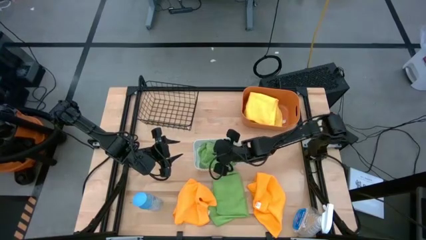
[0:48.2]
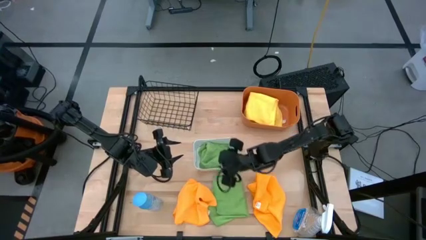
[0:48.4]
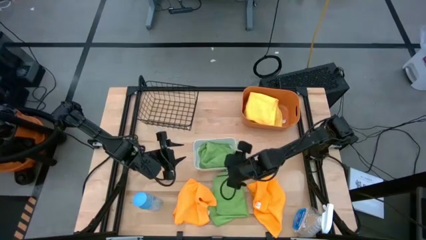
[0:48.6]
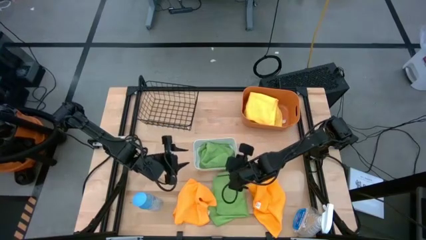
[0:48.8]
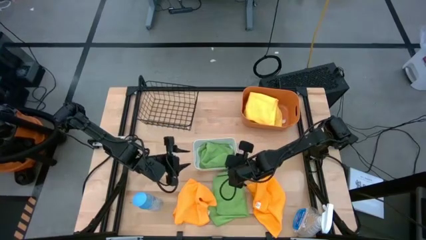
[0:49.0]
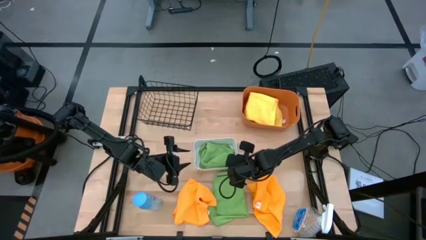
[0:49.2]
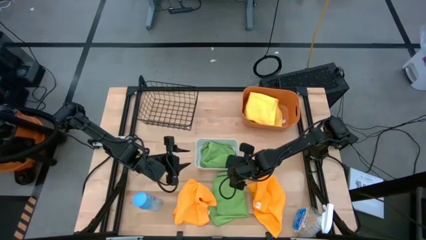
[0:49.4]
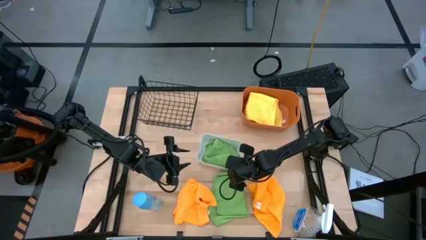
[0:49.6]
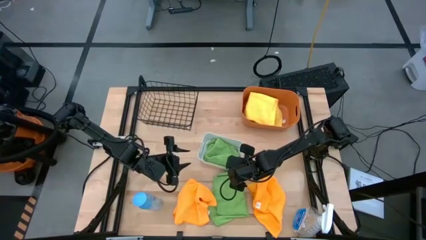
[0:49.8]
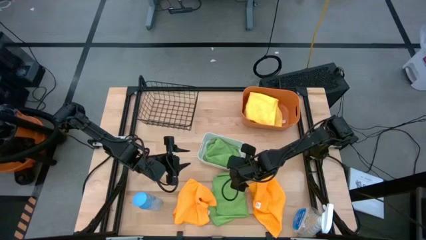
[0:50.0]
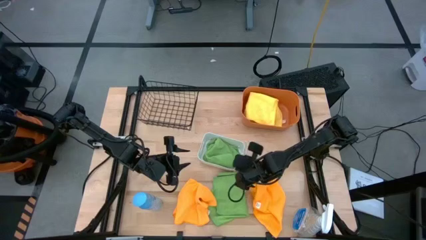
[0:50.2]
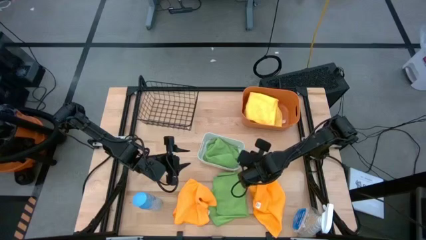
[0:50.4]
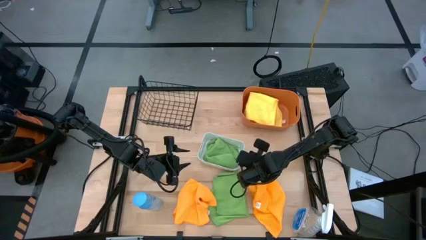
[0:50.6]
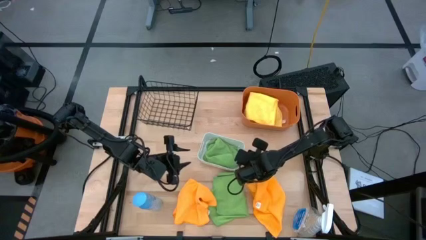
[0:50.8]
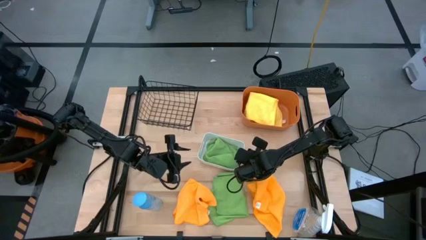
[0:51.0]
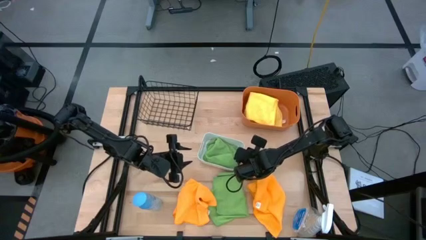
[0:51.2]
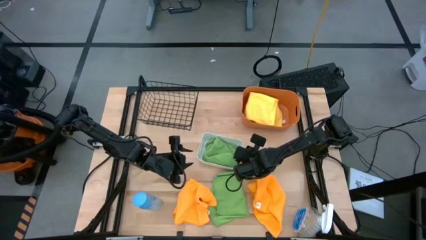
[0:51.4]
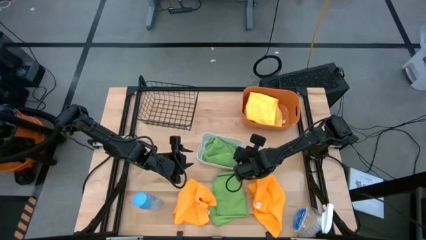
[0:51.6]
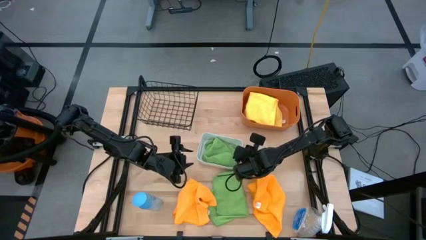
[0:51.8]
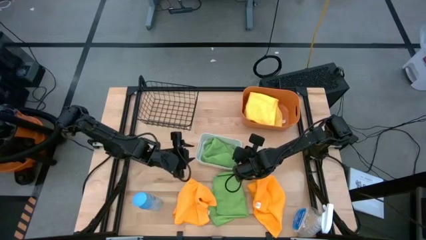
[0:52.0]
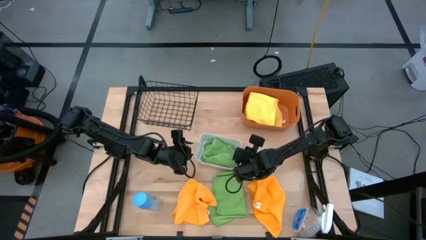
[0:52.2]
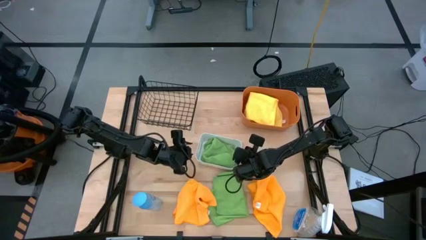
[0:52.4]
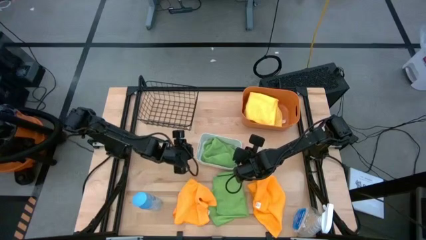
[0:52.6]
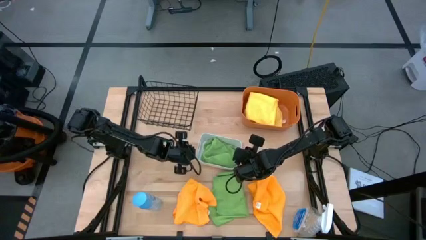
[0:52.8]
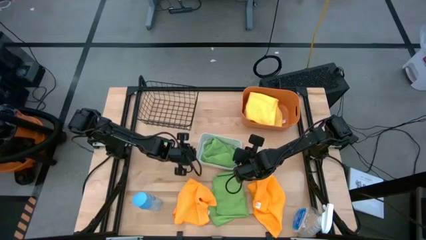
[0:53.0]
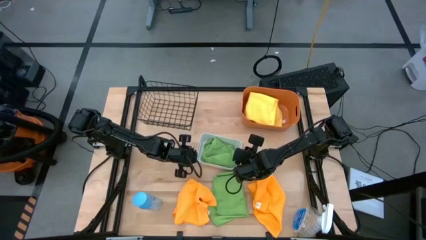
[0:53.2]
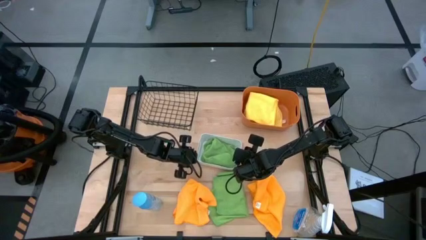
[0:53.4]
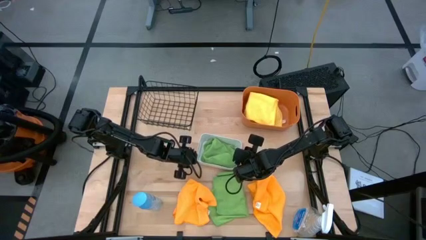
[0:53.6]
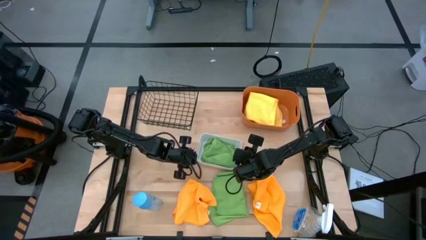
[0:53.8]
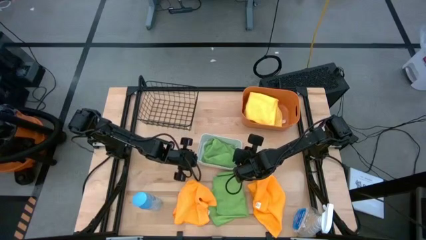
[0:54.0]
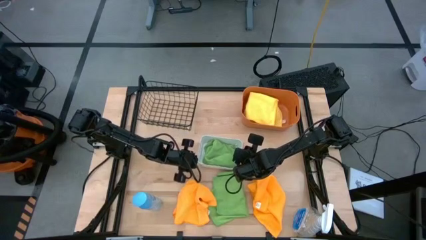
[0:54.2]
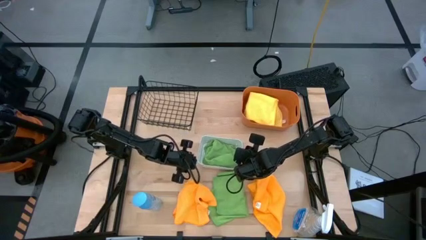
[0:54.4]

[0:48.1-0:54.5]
Task: Sort microfiber towel by color & place in baskets
Adjust the white bin

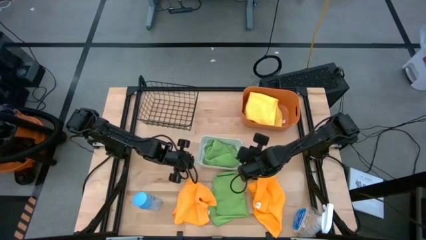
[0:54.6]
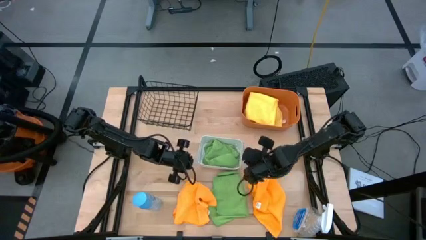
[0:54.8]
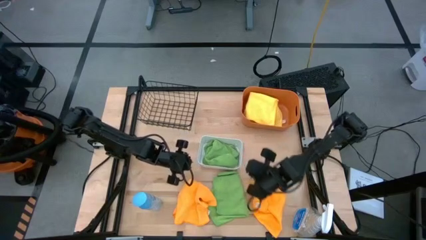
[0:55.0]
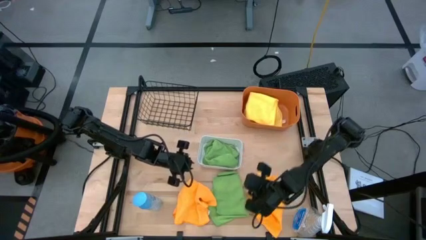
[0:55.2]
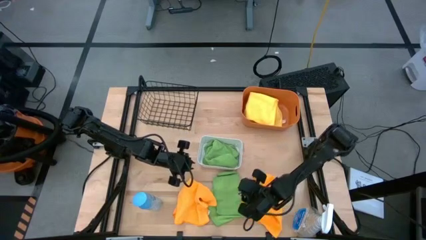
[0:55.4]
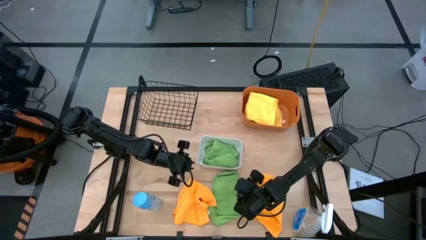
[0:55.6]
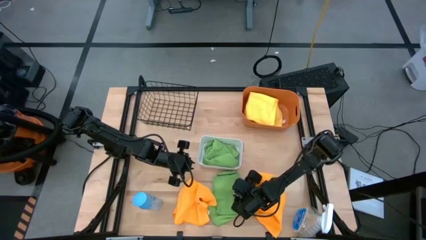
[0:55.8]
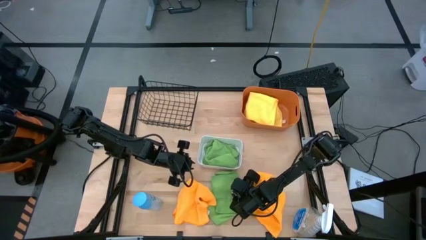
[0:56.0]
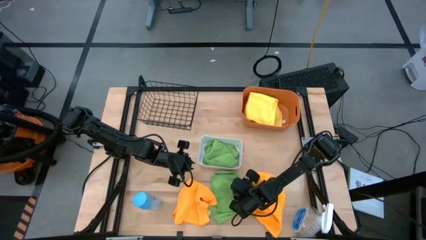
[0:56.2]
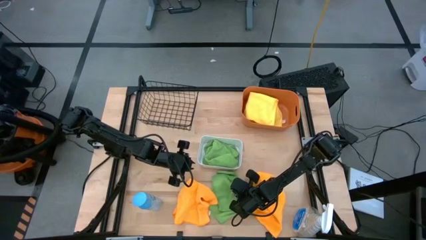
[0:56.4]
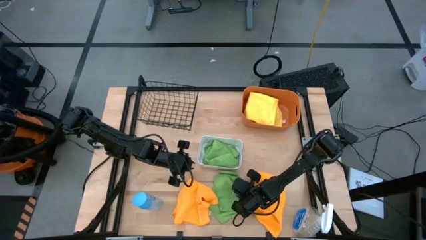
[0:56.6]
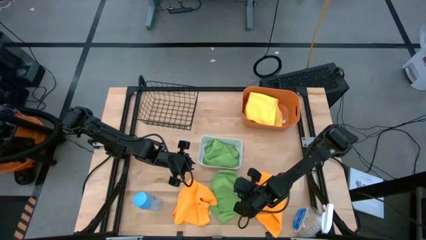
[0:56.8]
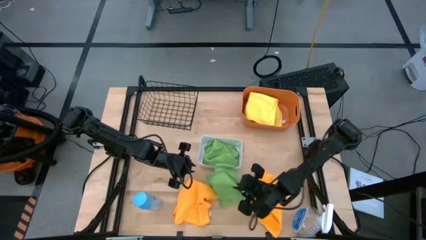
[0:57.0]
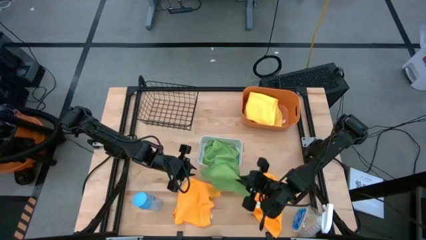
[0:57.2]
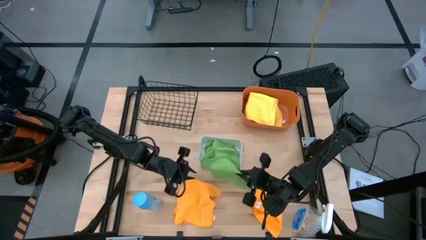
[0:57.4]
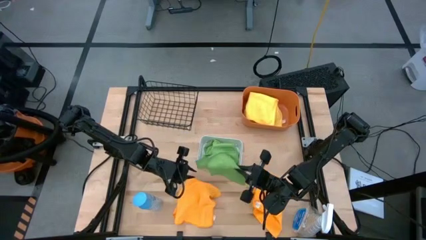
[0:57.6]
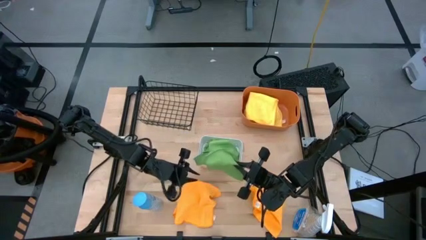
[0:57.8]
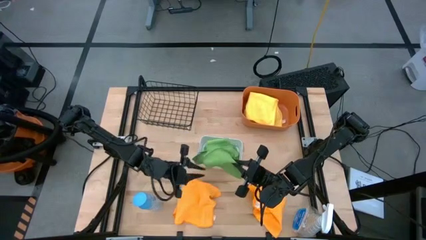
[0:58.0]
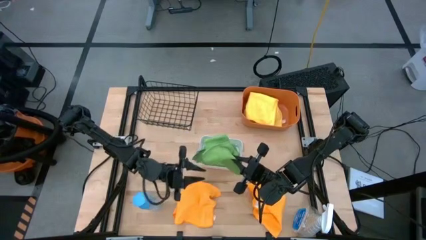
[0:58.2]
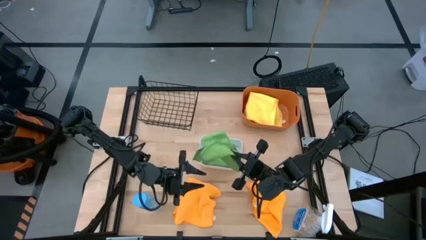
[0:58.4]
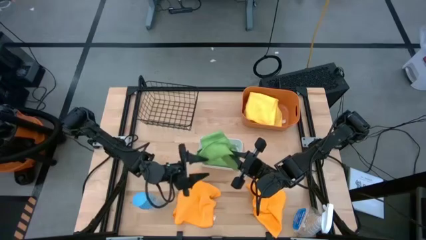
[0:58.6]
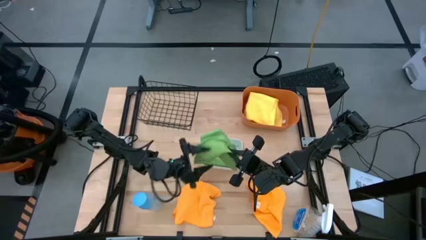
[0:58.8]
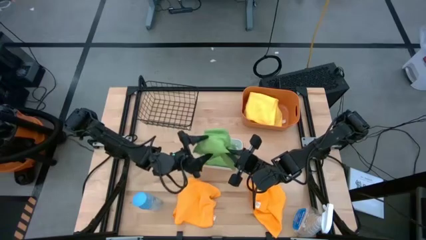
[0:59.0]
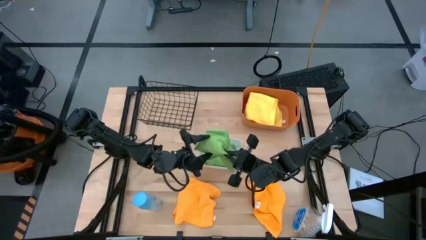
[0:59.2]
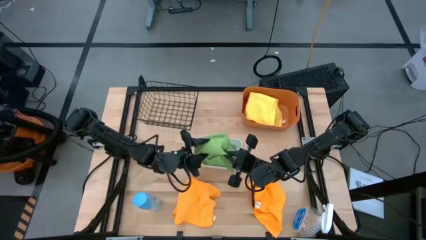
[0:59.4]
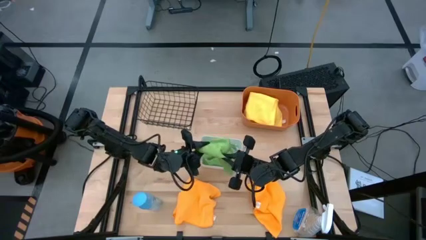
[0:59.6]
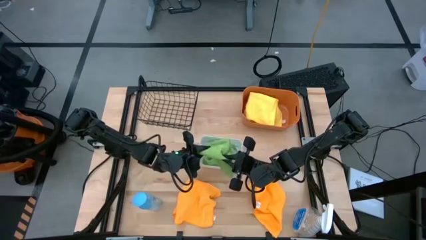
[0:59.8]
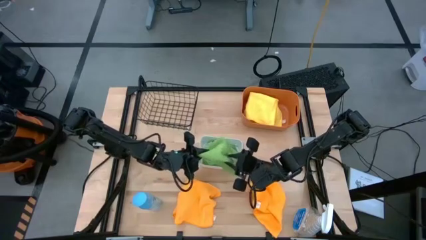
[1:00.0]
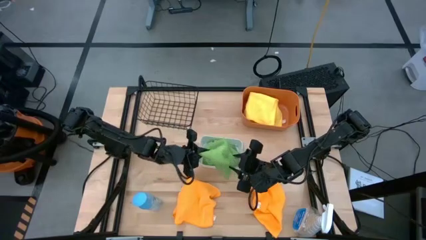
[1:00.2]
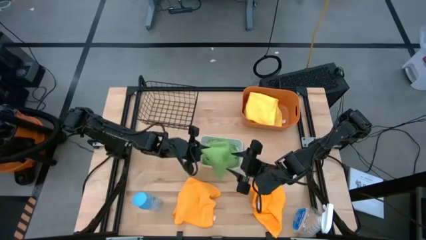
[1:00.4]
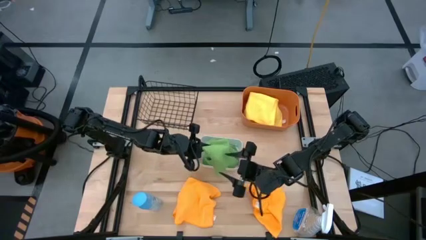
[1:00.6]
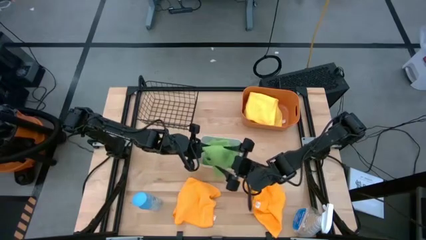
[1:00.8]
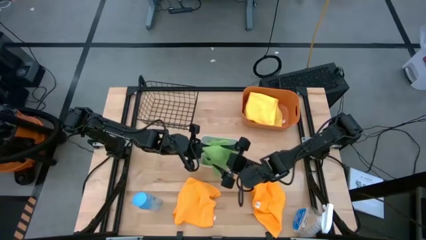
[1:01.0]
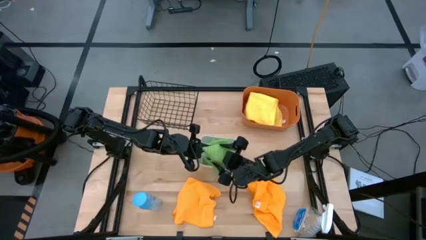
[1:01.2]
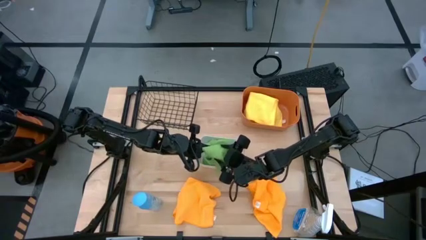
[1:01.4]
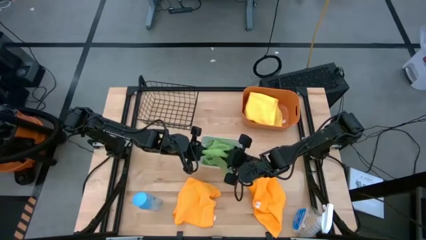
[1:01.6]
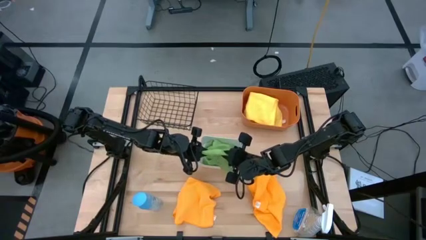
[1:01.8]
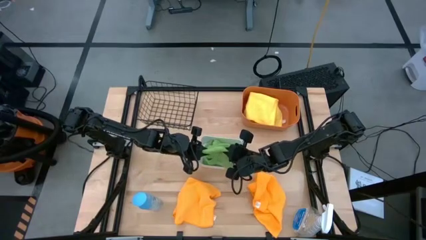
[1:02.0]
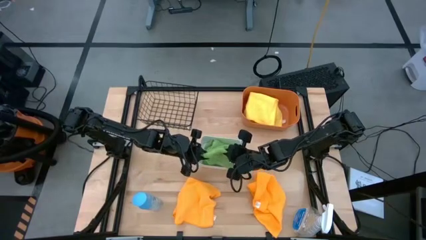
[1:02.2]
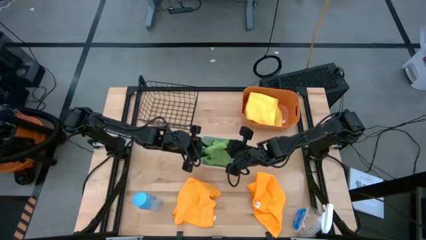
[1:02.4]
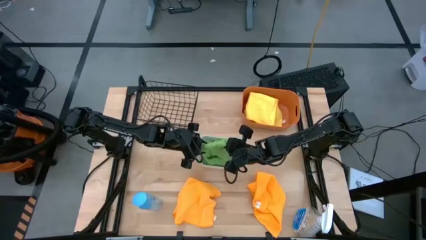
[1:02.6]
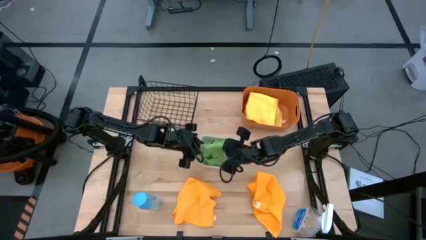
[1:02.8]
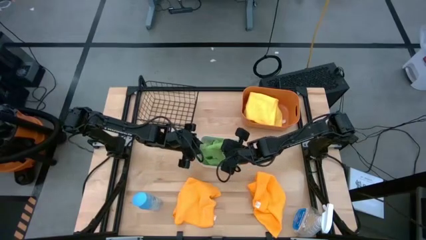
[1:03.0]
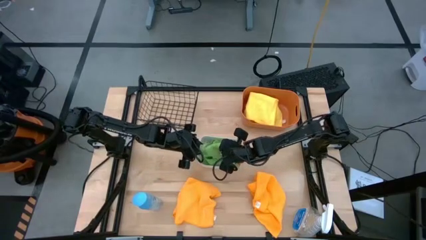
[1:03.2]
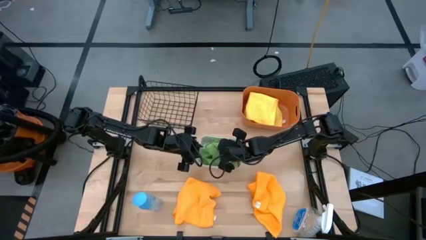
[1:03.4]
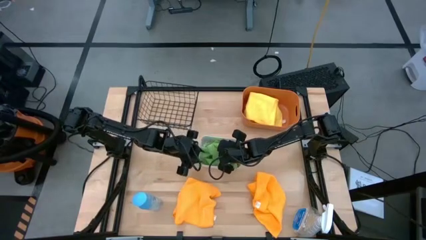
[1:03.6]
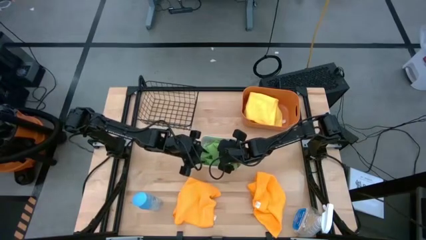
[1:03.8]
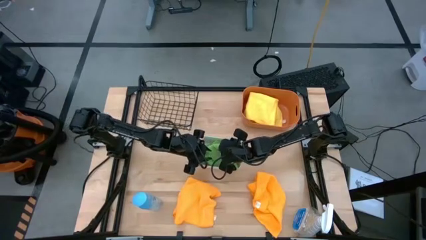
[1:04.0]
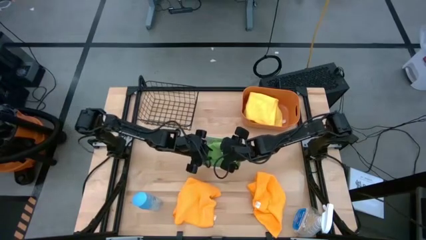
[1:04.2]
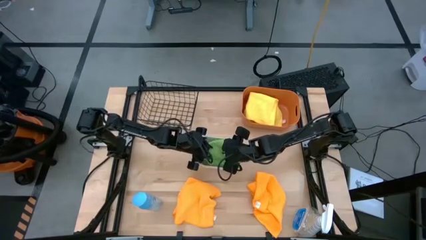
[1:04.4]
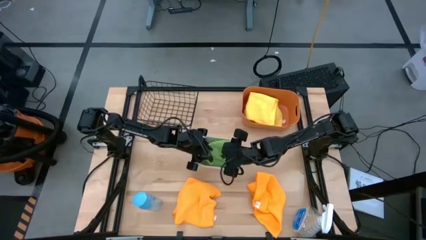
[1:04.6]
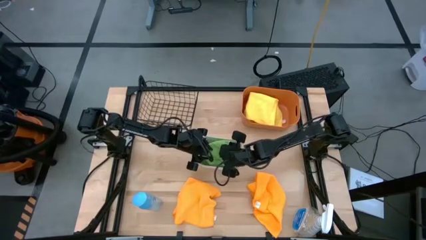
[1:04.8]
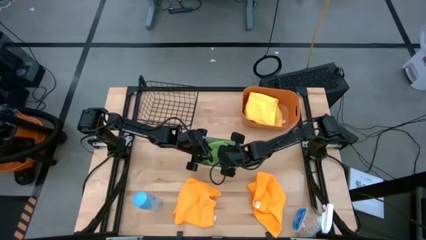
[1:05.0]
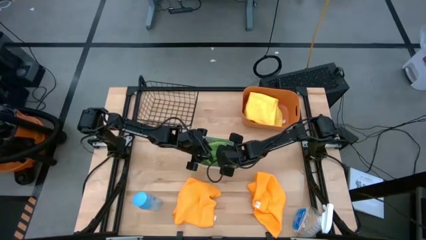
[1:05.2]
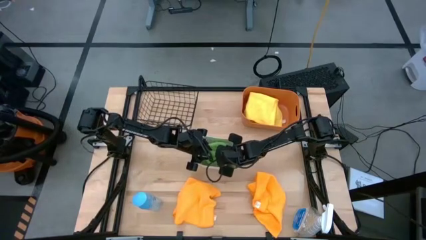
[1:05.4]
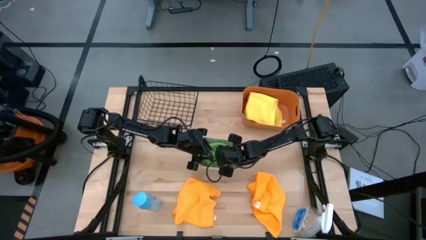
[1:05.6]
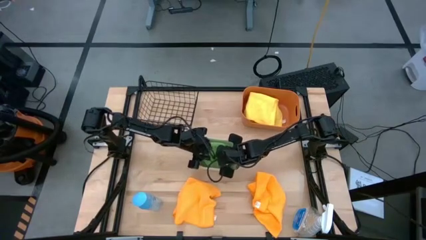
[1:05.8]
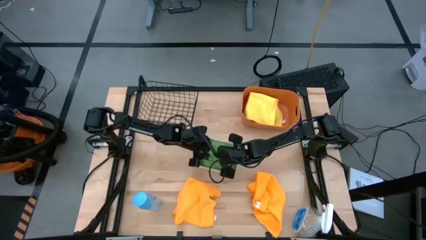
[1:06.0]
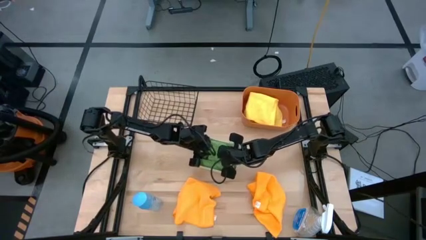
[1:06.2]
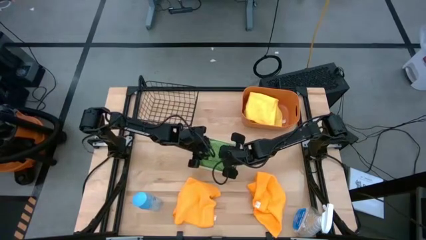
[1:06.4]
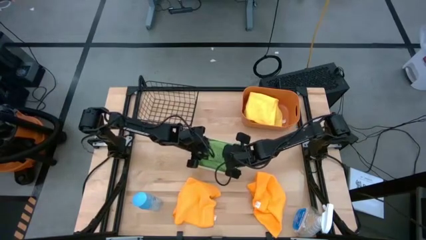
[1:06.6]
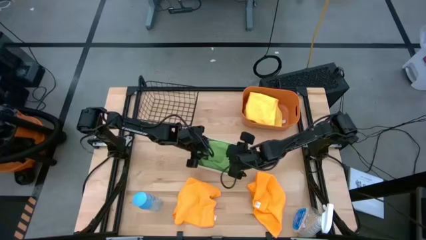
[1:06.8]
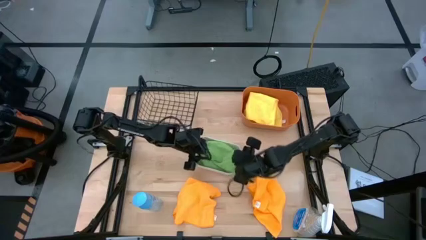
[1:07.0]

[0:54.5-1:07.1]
Put the green microfiber cloth into the white bin
